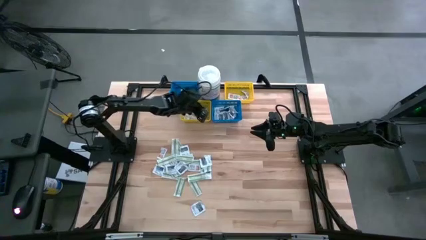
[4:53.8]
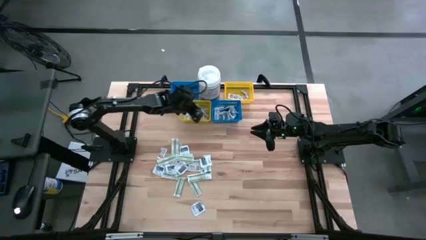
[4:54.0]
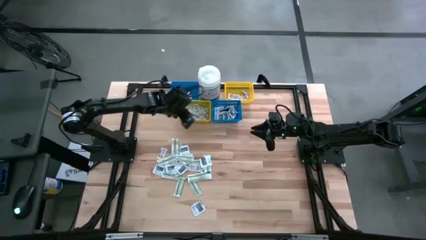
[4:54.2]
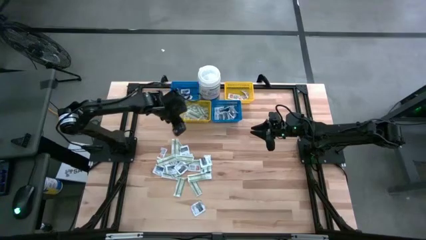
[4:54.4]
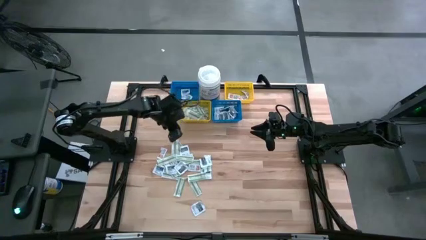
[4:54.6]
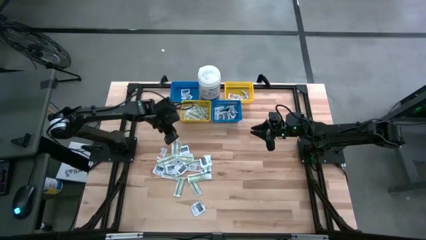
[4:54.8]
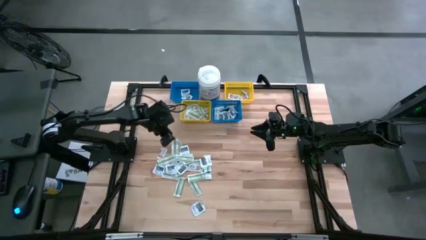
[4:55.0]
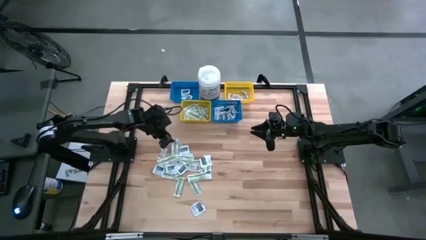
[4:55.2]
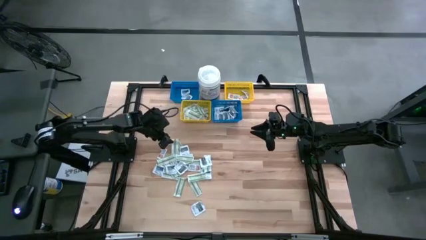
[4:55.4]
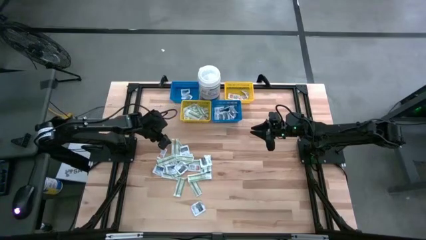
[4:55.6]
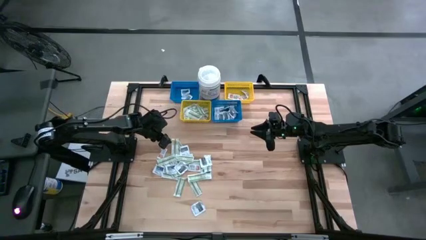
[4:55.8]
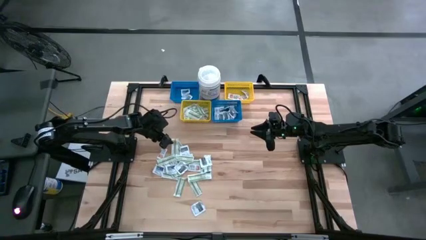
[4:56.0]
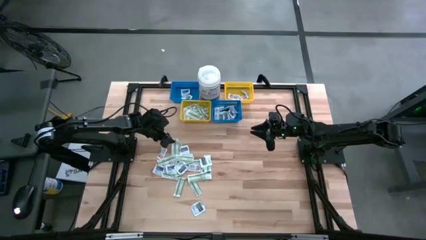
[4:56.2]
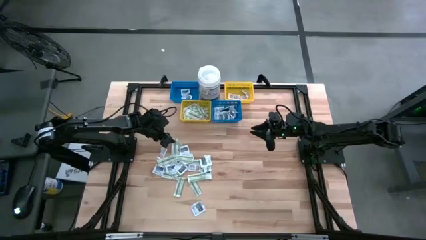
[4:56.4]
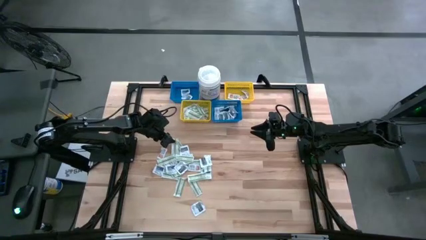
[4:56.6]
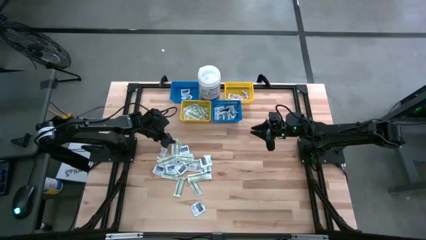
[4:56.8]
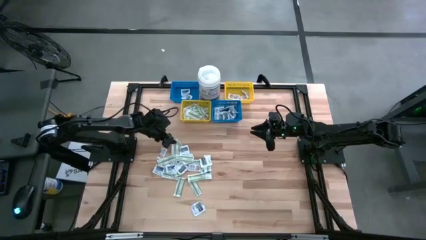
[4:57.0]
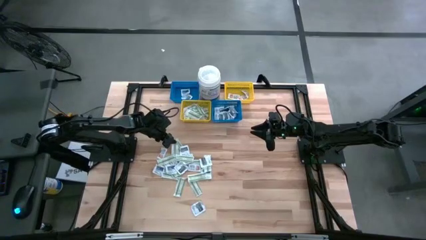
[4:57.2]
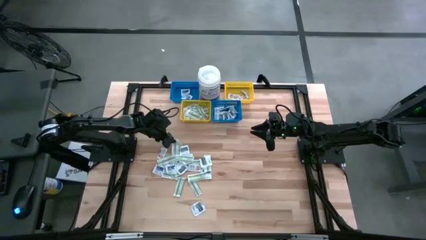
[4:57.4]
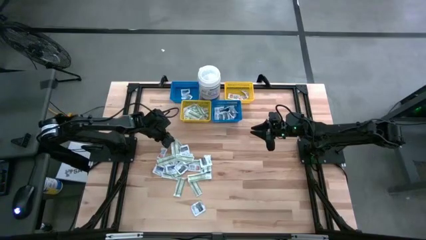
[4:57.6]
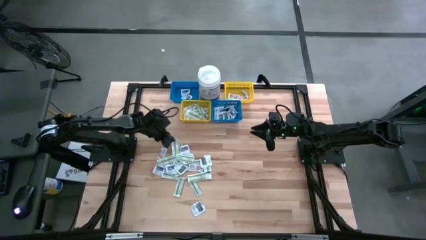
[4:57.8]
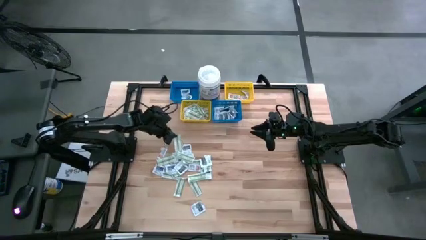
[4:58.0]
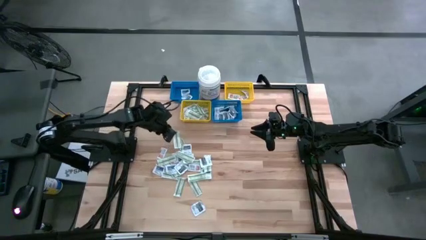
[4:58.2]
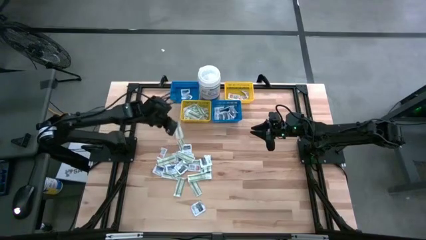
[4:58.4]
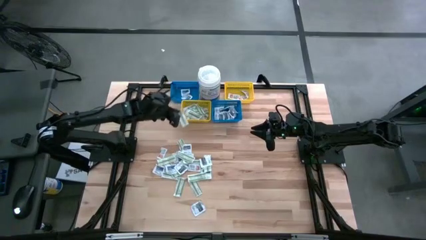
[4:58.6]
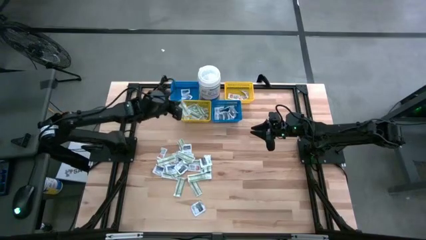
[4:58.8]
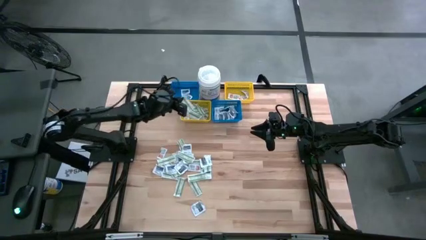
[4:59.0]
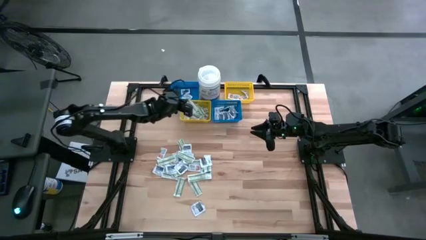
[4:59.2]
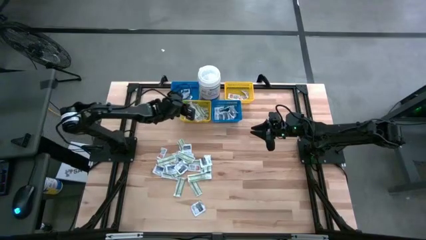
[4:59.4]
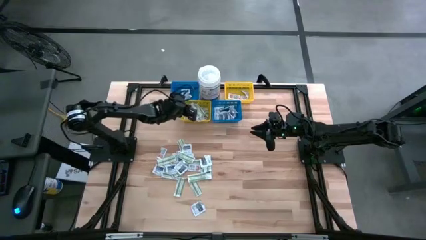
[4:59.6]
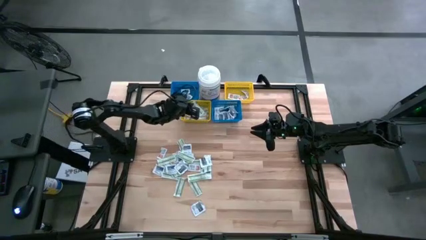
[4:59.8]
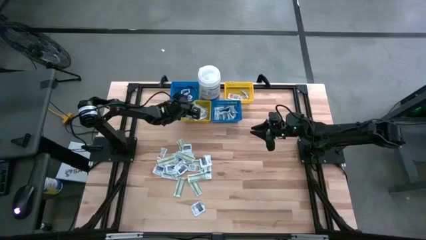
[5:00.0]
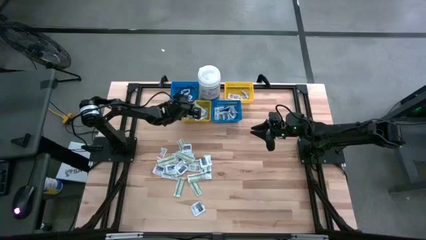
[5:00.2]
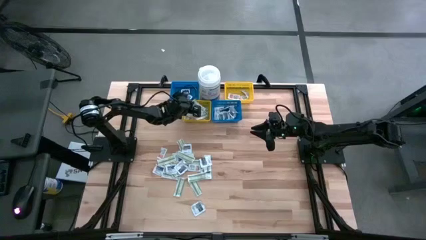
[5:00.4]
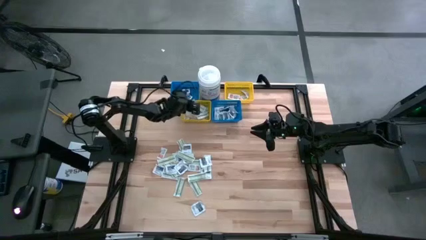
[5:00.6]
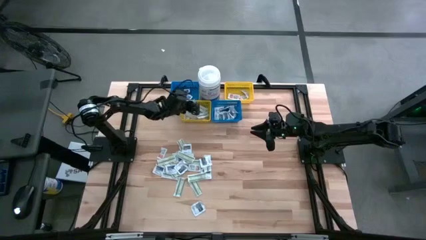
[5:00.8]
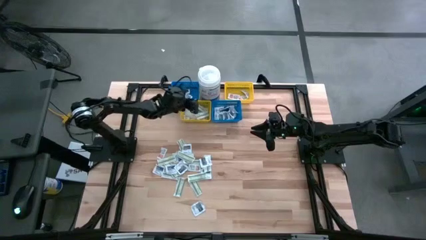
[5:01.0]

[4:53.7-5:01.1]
Task: Pick & Place First Aid Supplies
Put the green bandage pad into the left yellow bin

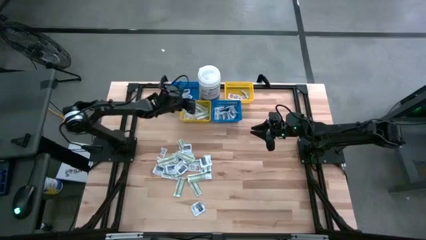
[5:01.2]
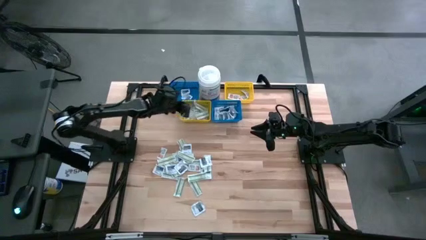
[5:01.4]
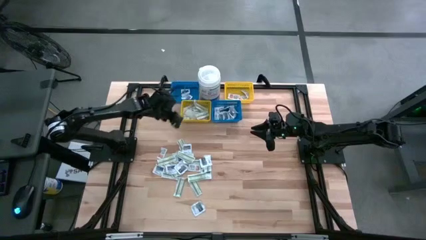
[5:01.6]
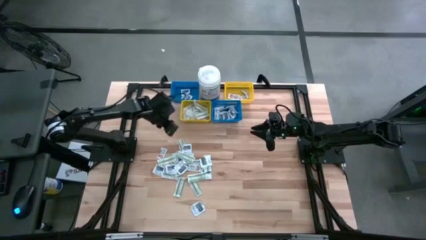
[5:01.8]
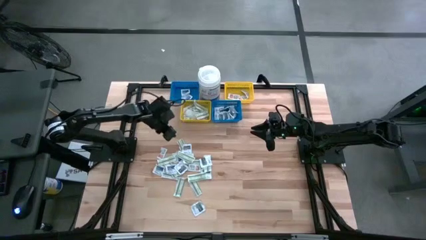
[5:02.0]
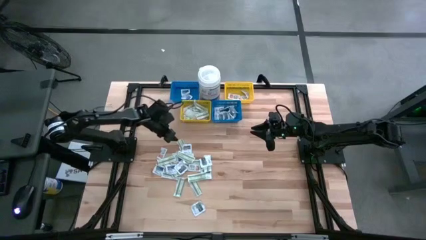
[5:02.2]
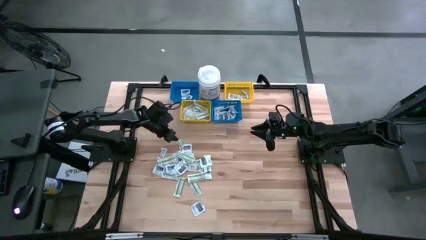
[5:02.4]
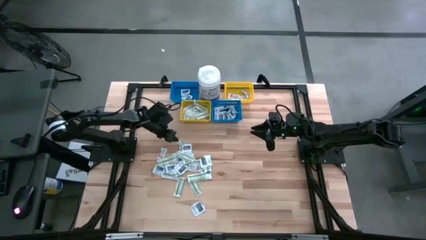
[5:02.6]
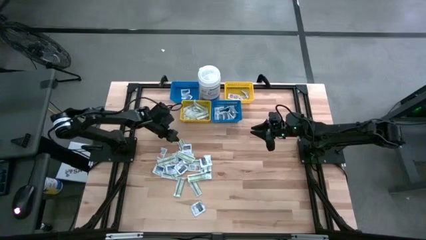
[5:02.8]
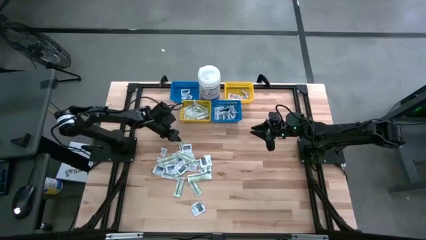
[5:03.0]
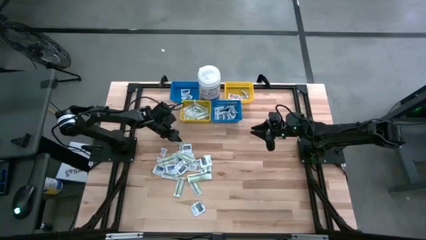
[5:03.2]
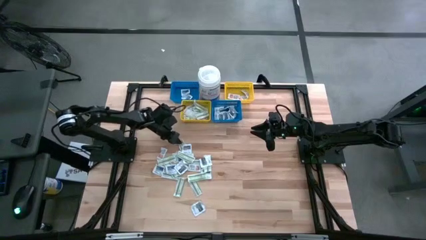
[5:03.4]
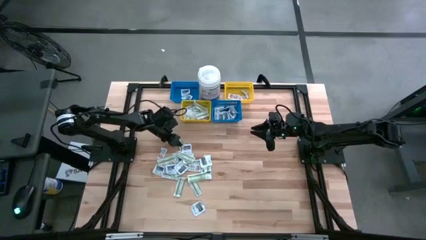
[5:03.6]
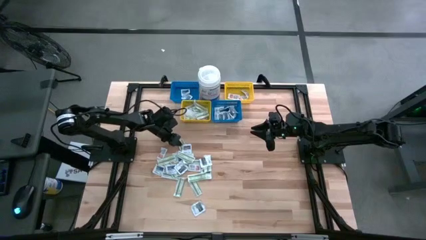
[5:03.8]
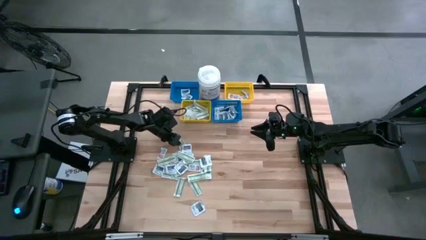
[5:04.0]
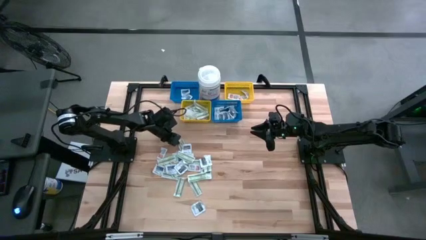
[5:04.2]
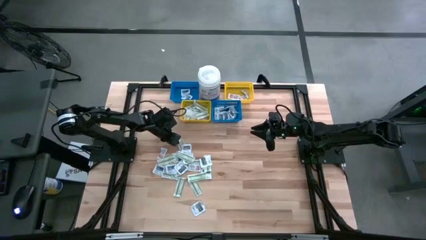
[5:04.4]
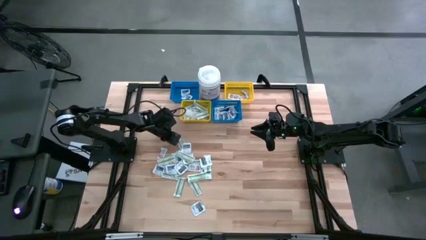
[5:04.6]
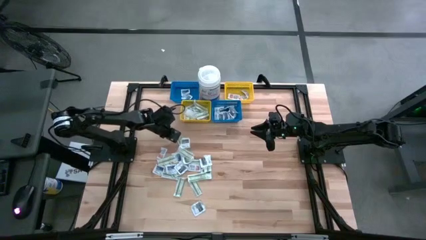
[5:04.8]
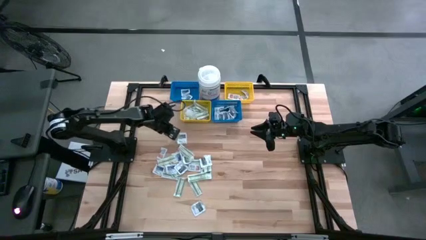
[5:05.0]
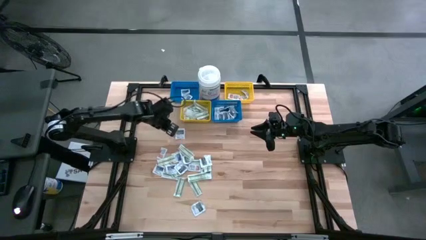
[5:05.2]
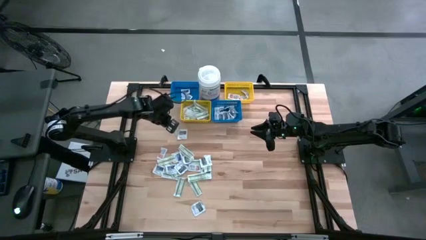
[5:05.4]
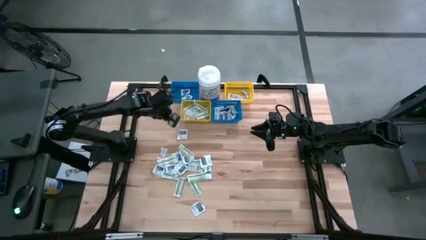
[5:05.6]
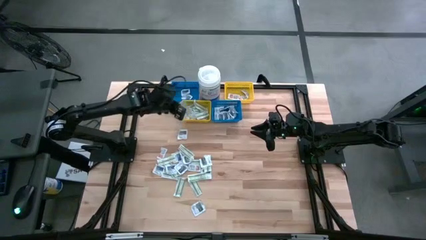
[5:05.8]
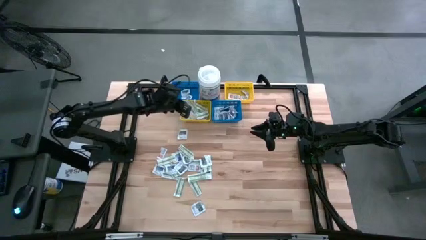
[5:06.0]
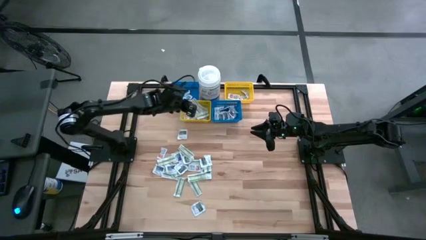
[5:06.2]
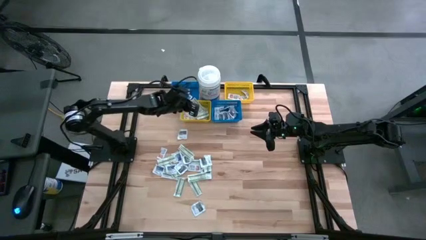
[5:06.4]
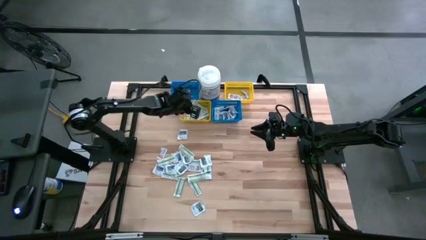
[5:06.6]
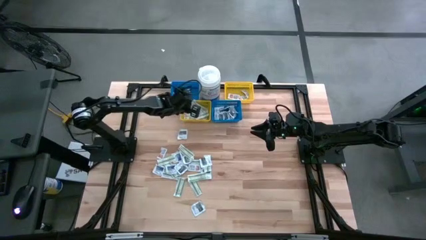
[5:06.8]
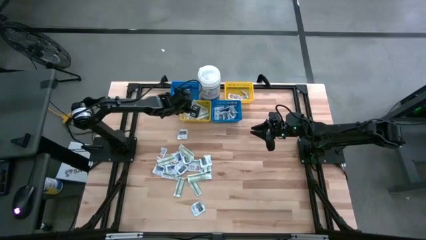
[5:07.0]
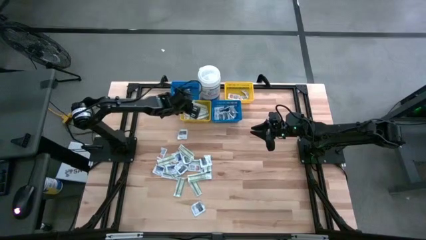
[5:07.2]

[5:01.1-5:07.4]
Put the green bandage pad into the left yellow bin

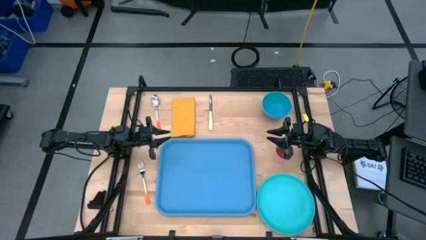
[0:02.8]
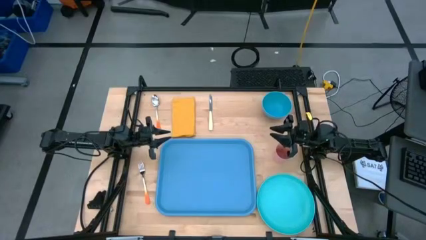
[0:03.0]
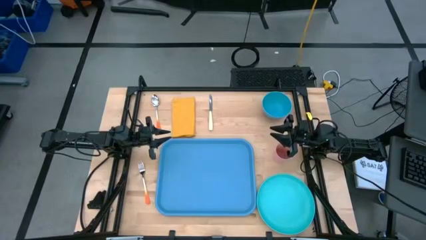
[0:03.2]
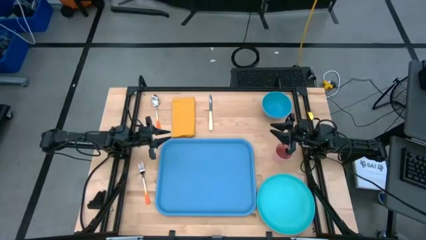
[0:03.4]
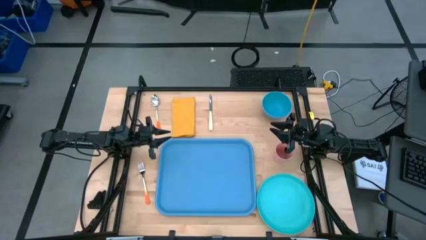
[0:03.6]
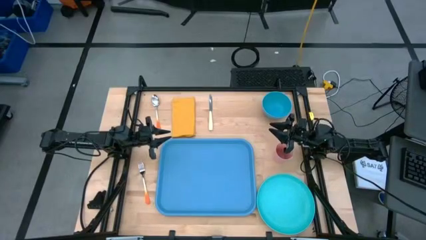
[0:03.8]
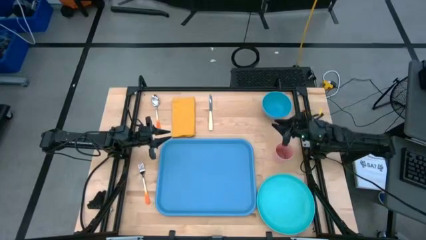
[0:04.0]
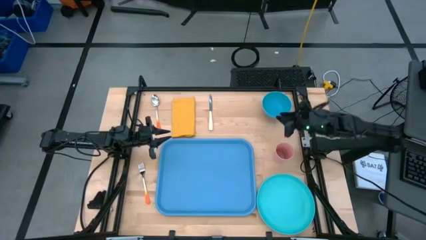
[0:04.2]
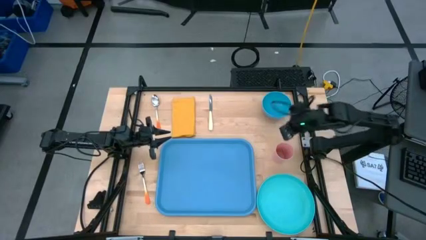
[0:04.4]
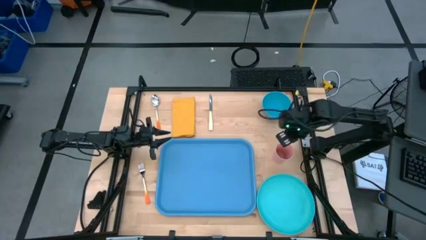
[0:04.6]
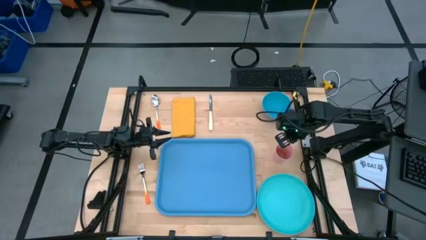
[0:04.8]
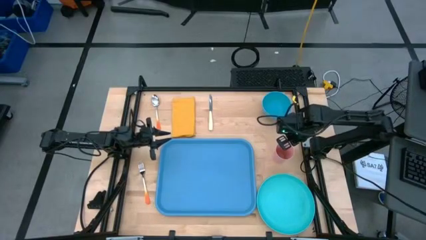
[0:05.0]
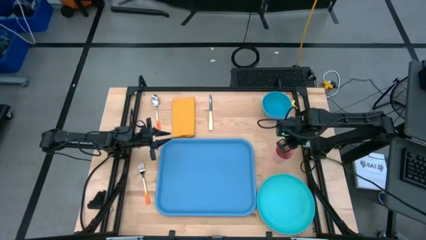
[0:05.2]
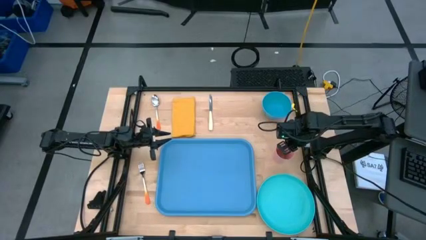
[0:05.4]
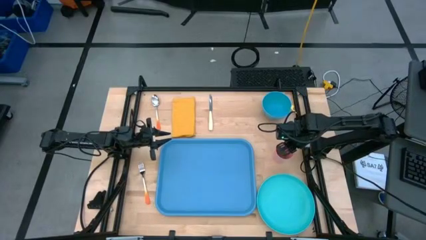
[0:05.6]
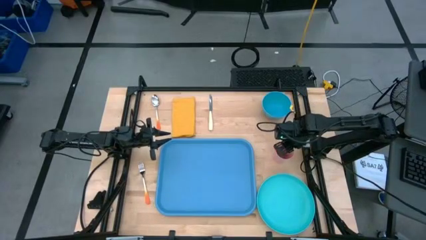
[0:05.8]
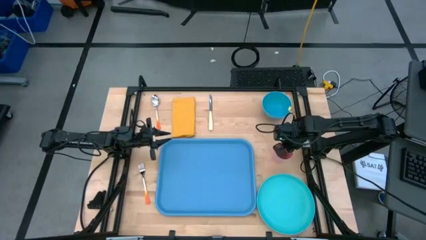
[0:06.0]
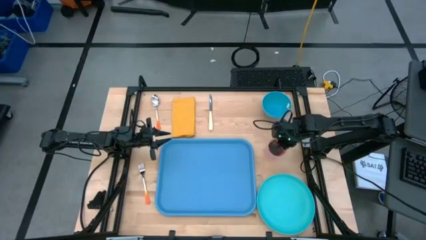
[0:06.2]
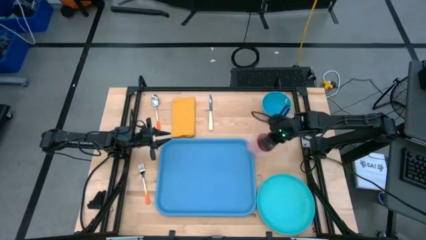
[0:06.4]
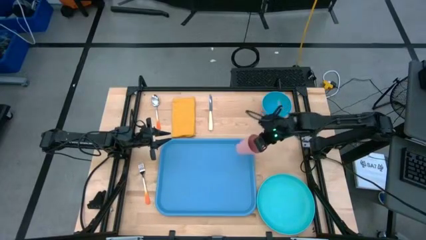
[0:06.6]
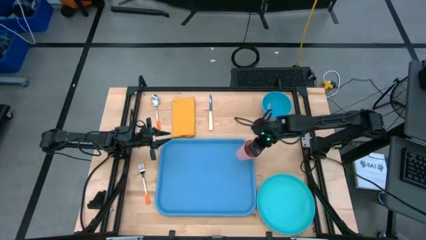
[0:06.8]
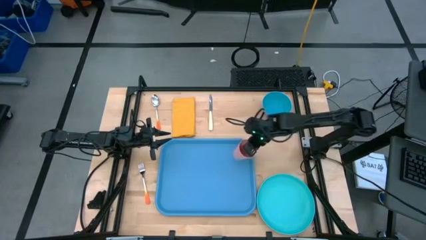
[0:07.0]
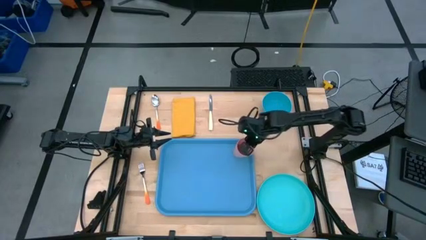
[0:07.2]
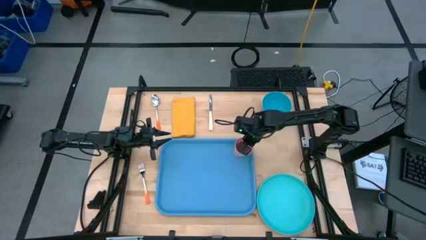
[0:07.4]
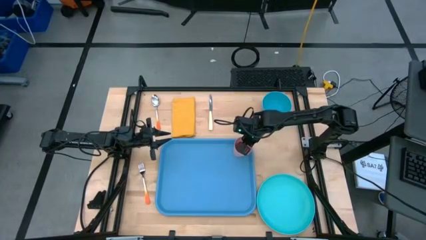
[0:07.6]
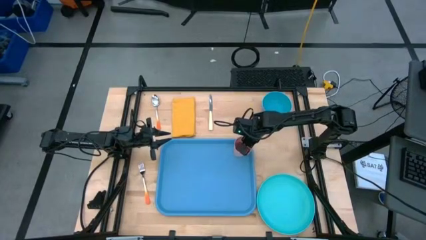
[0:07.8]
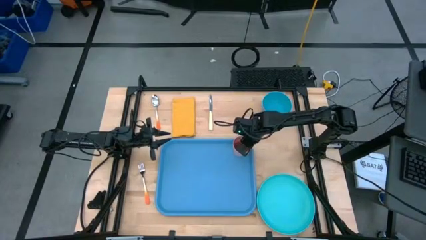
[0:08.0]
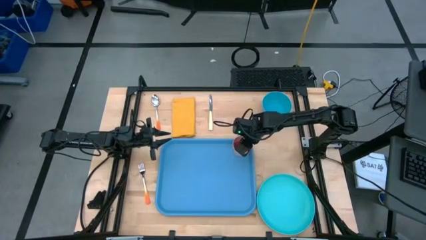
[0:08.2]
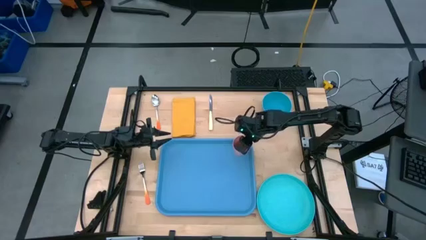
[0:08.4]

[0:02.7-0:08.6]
Task: Set up tray
Put the pink cup on the blue serving tray
